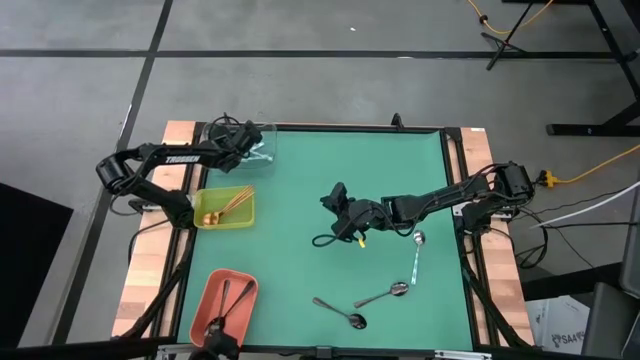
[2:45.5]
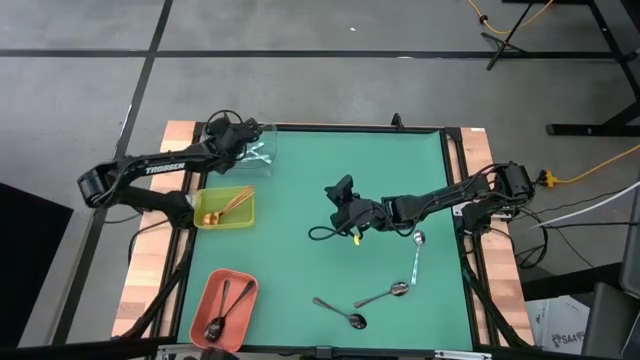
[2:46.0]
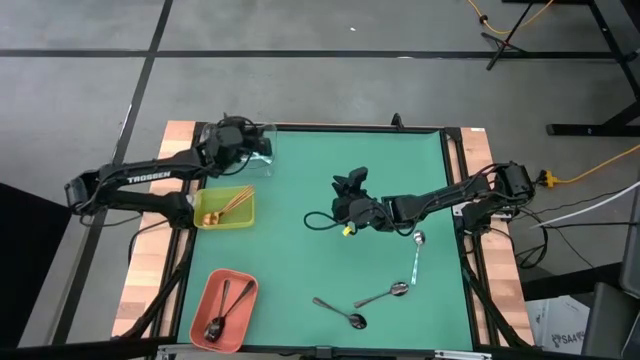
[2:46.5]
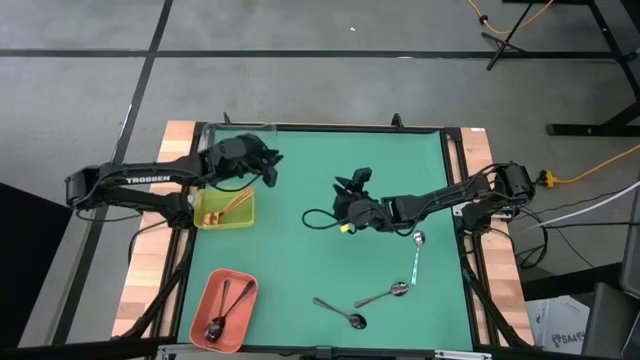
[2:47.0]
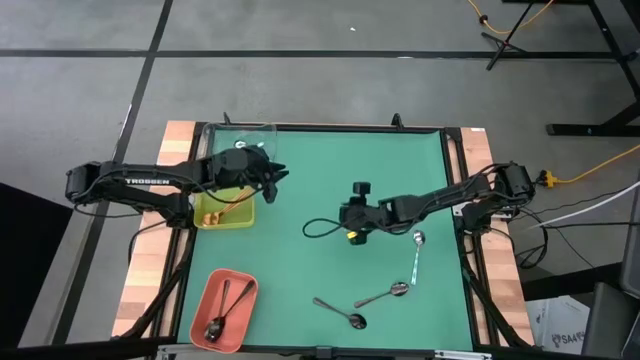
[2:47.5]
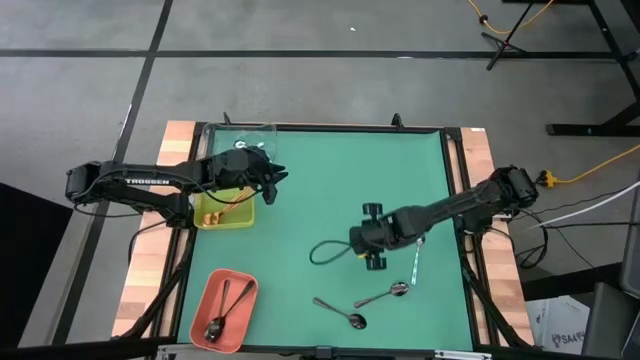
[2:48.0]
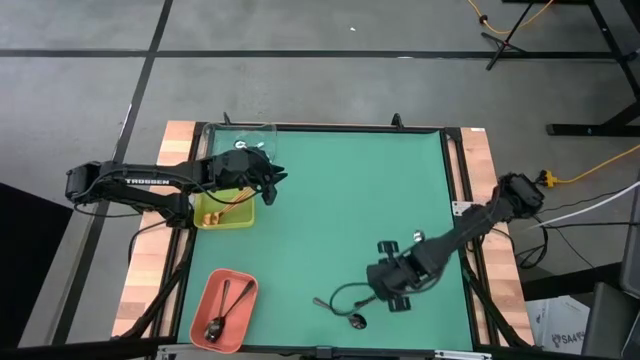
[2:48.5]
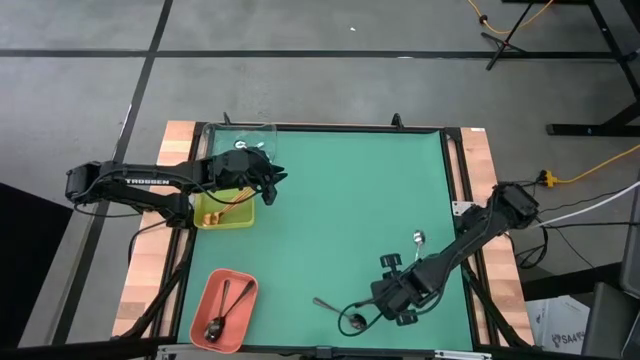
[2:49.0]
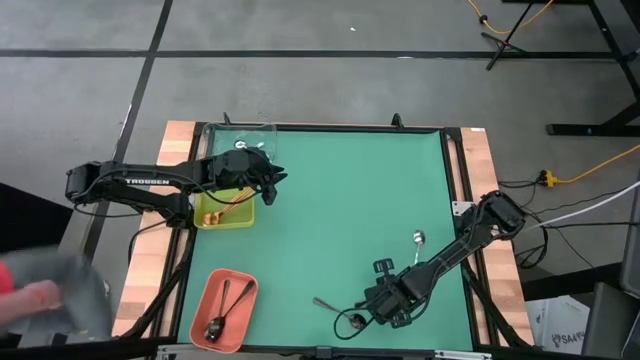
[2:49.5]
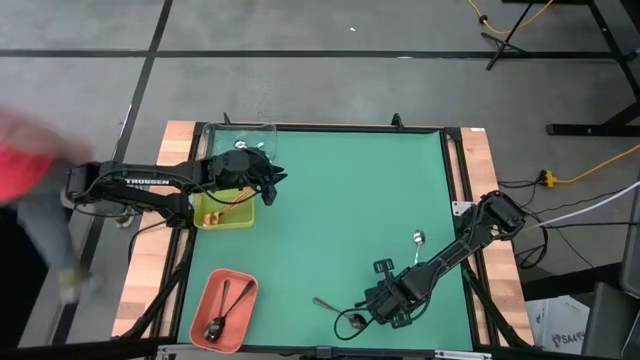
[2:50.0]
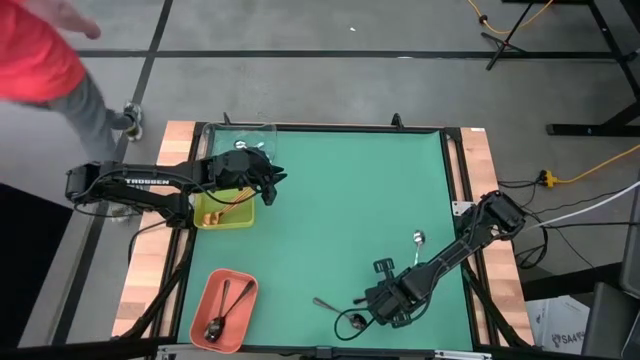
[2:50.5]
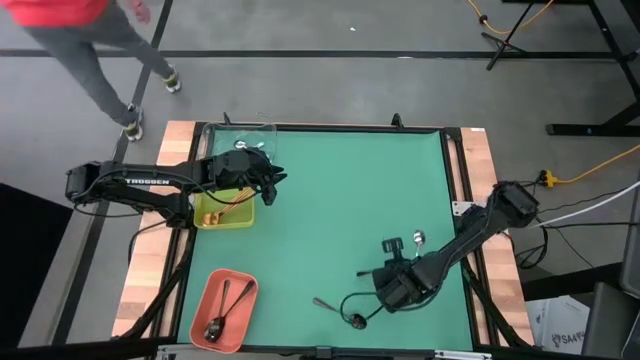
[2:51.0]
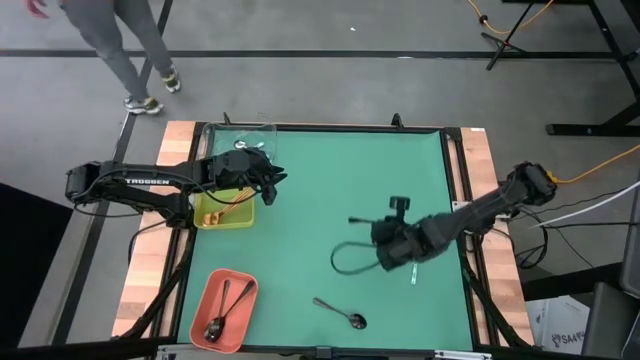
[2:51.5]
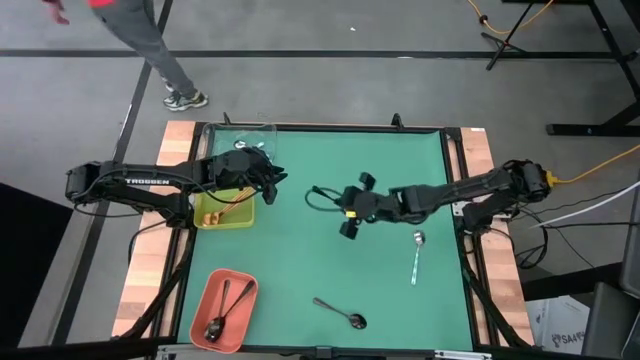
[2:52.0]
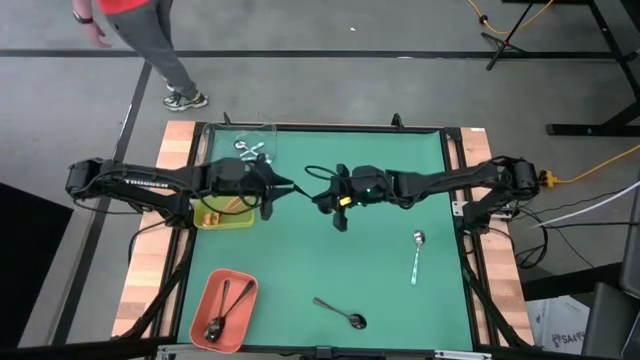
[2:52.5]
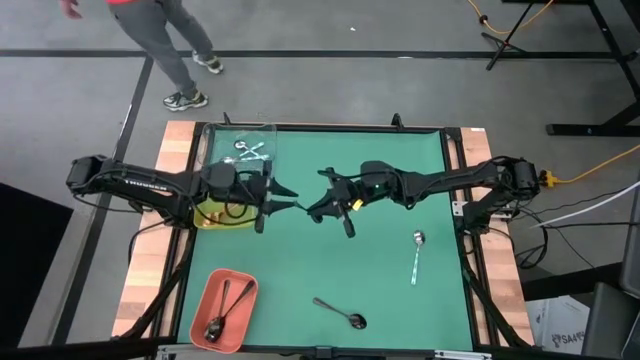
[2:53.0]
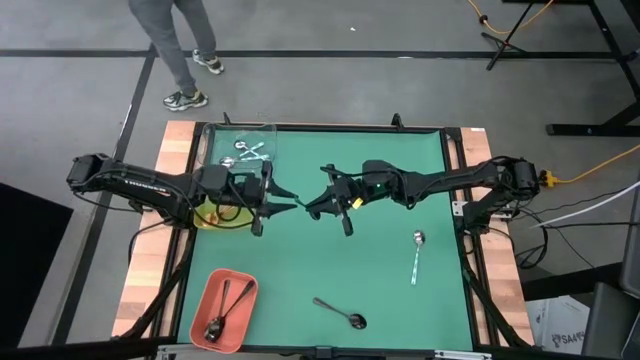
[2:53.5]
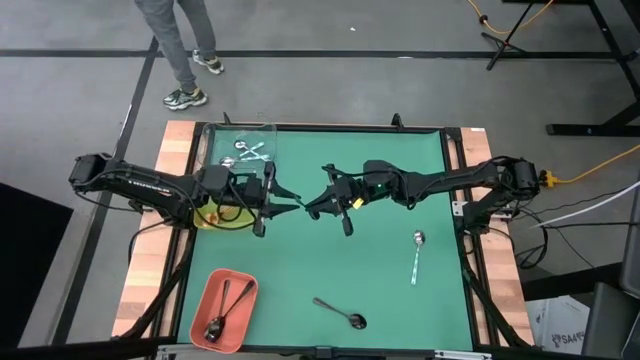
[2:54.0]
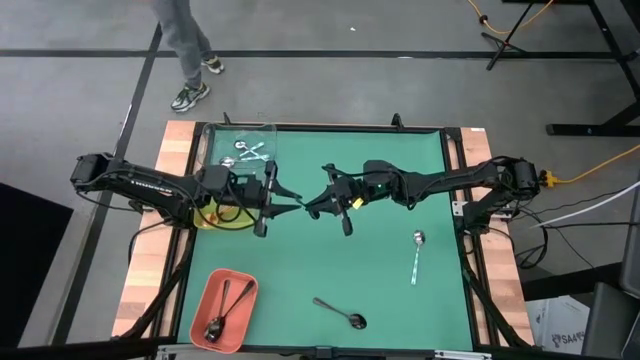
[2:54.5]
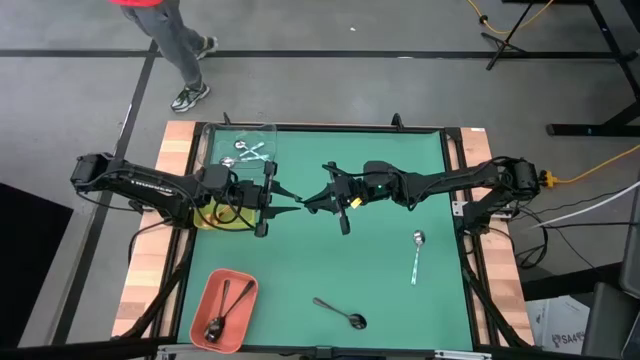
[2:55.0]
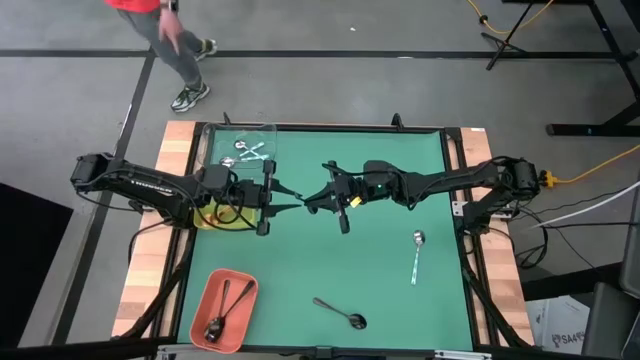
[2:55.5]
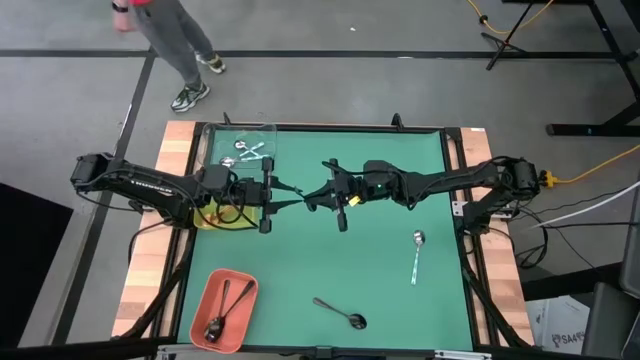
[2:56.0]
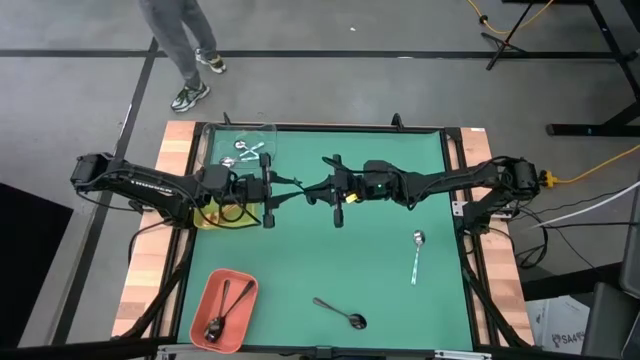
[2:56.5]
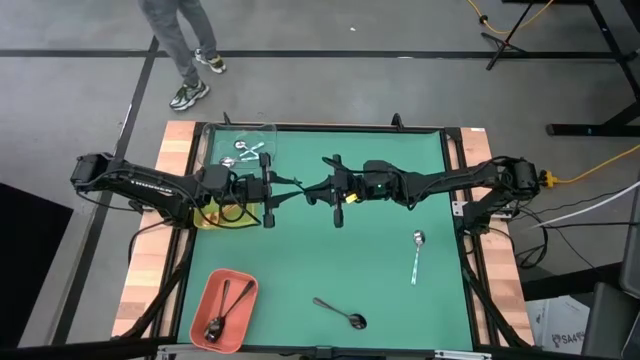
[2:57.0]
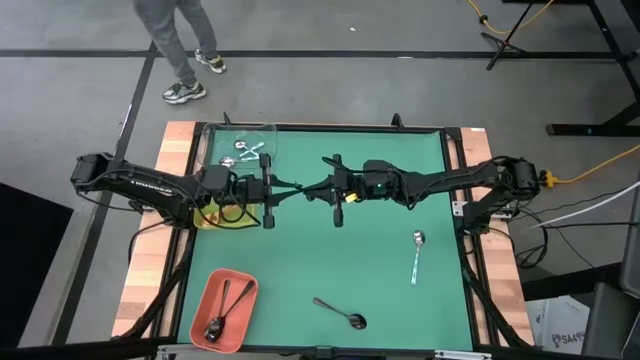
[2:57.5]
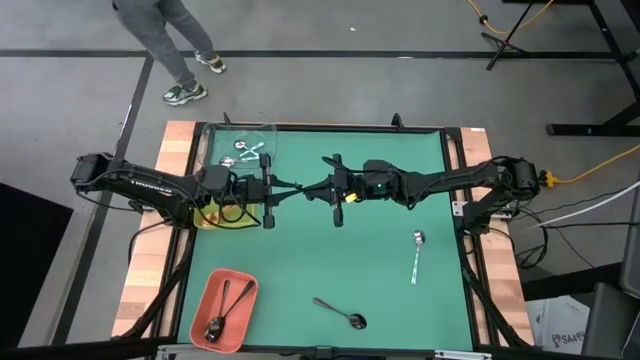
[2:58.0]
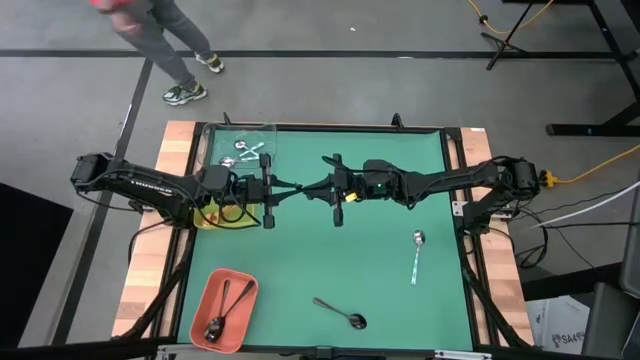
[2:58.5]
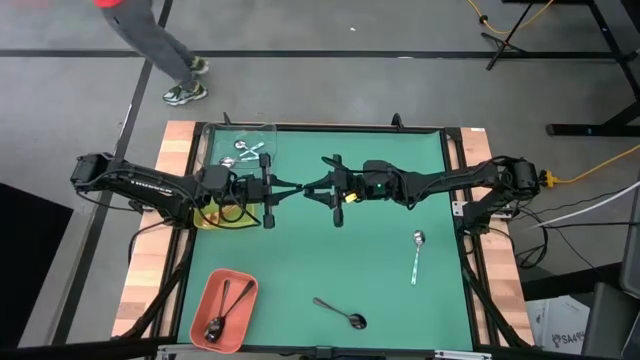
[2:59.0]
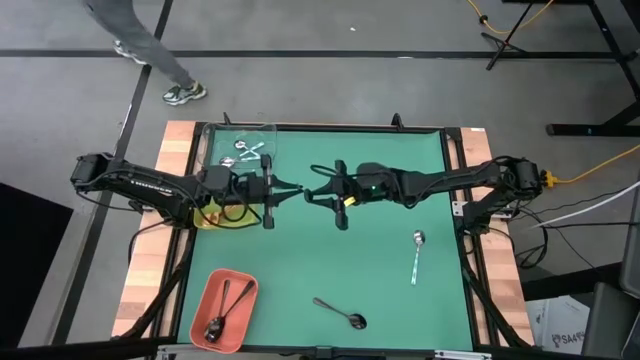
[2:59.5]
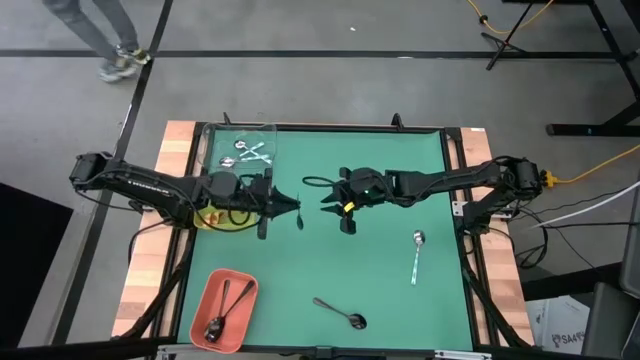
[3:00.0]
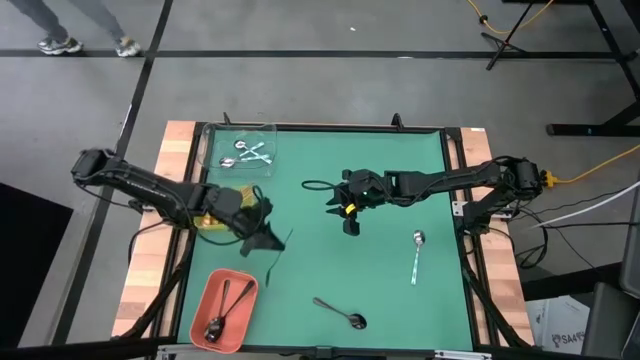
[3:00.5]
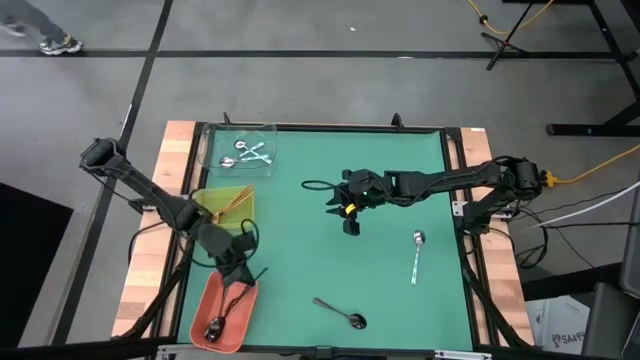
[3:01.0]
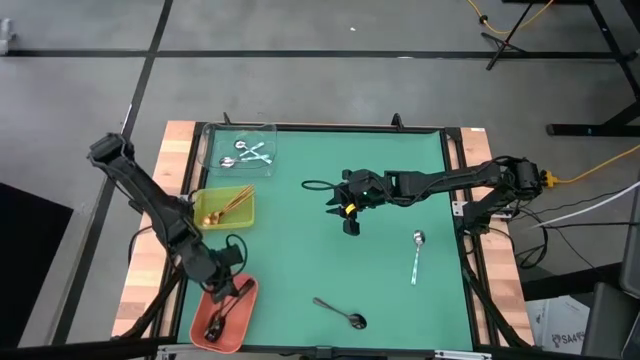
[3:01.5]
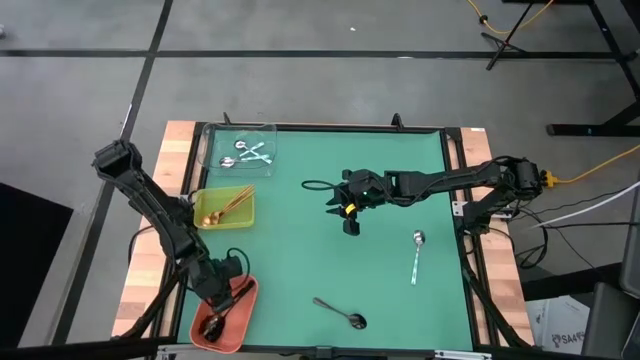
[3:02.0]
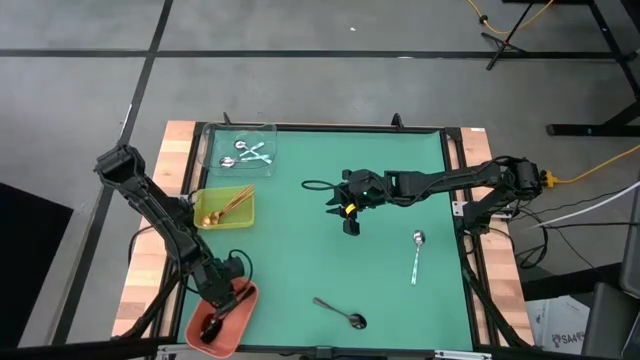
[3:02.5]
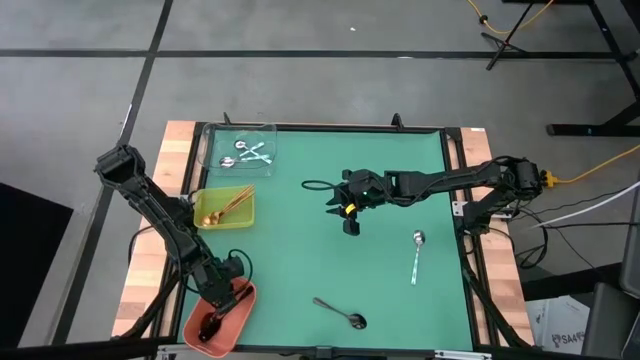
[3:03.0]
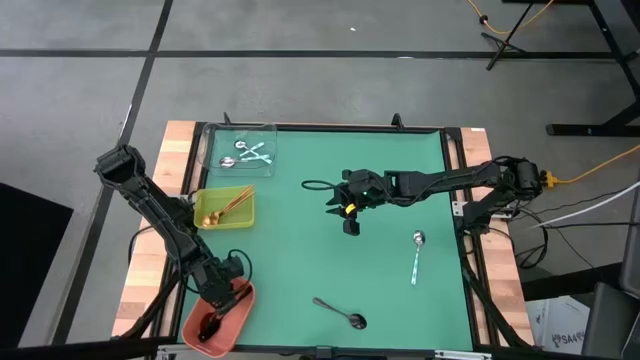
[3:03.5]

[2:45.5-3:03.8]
Task: Sort silverware by color (type)
Put the black spoon into the orange bin
